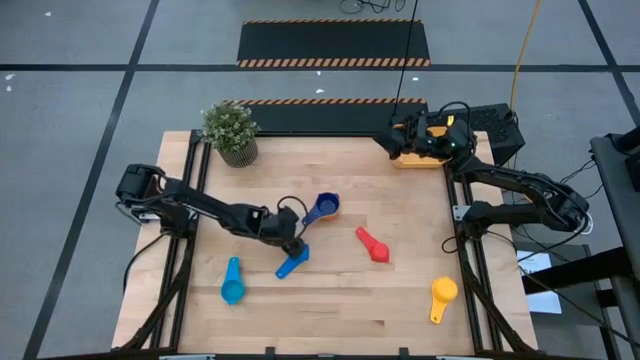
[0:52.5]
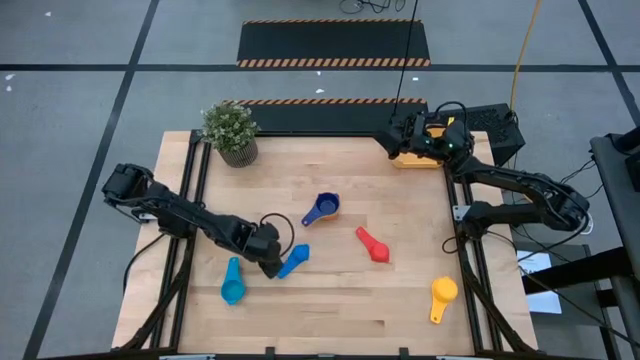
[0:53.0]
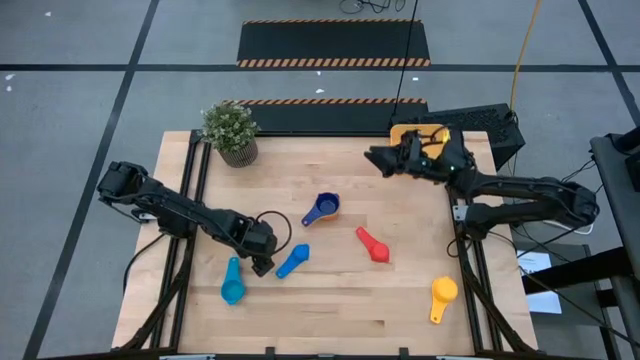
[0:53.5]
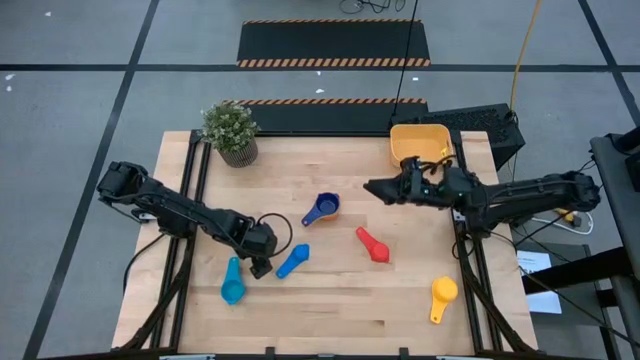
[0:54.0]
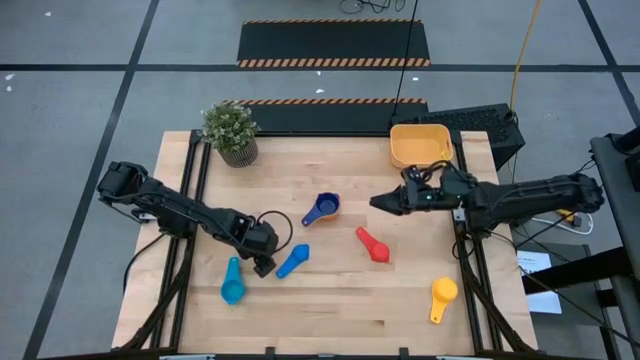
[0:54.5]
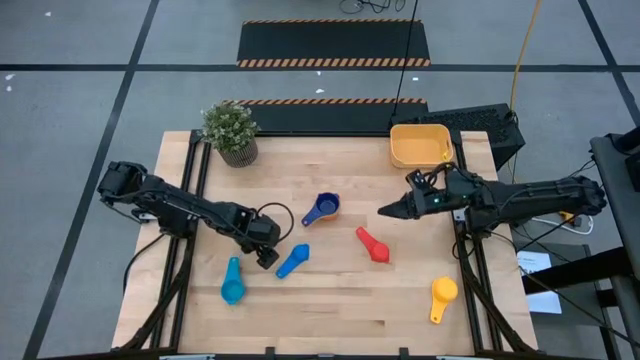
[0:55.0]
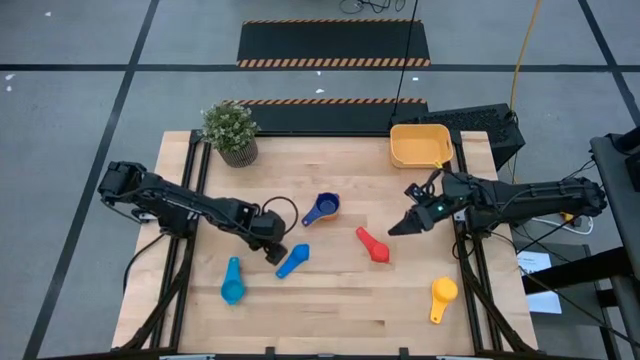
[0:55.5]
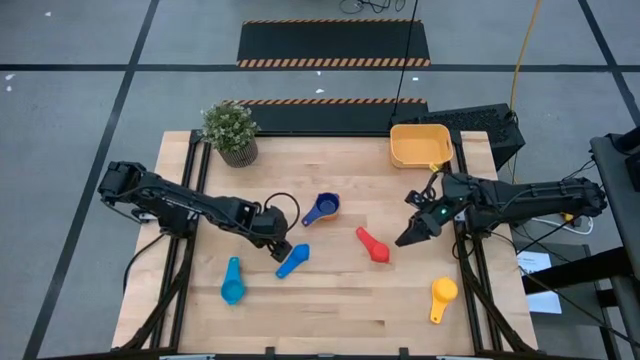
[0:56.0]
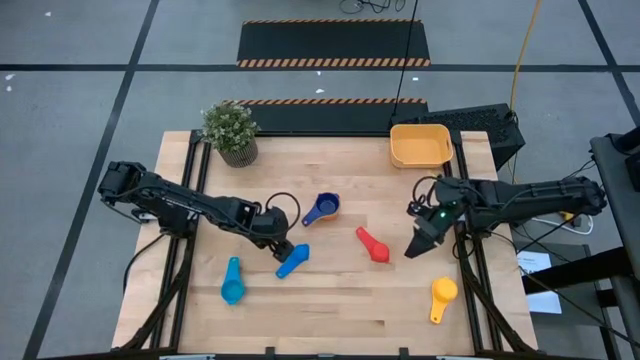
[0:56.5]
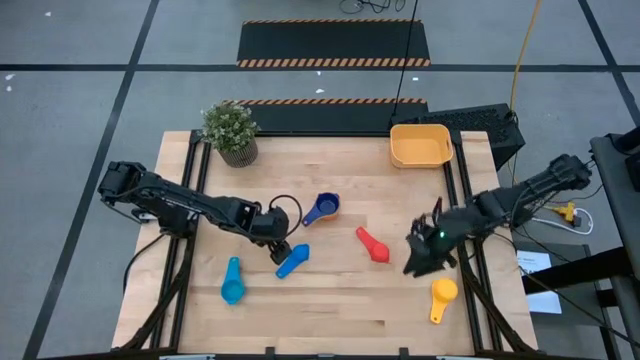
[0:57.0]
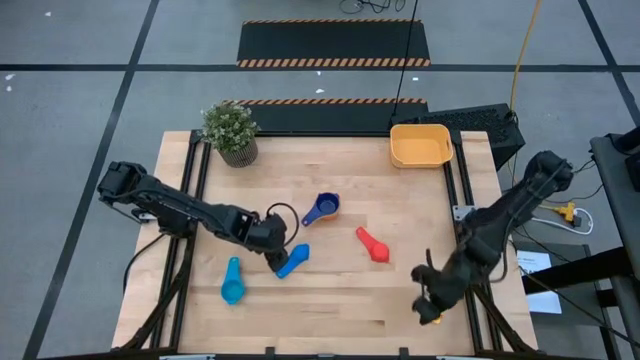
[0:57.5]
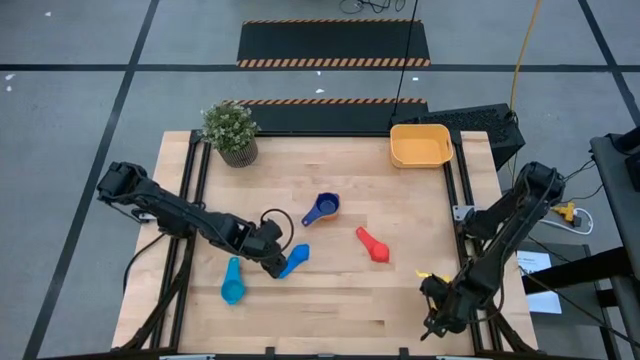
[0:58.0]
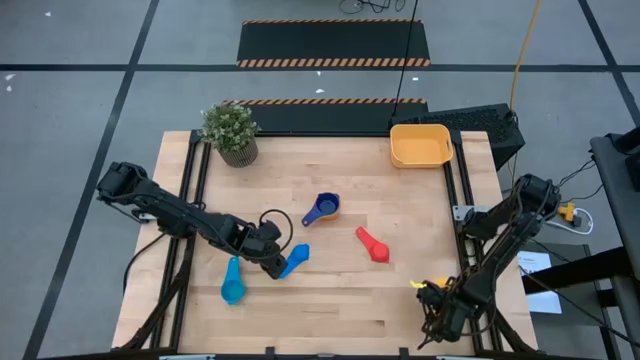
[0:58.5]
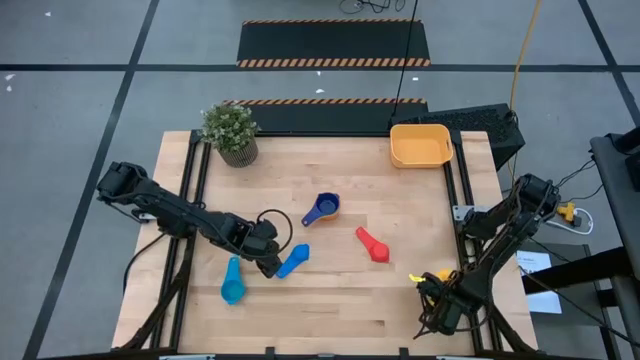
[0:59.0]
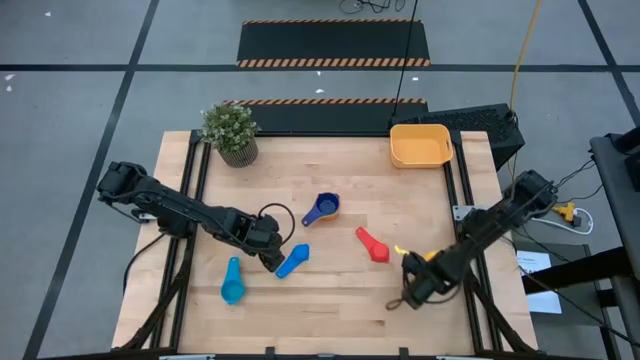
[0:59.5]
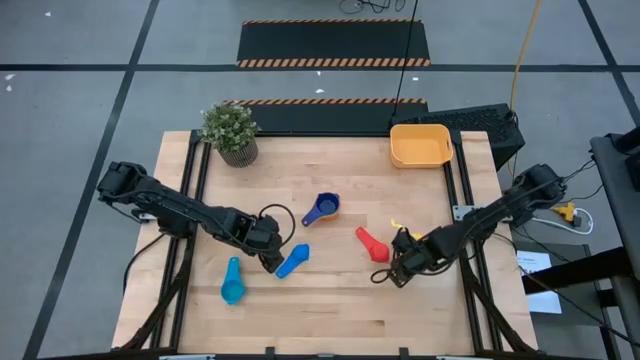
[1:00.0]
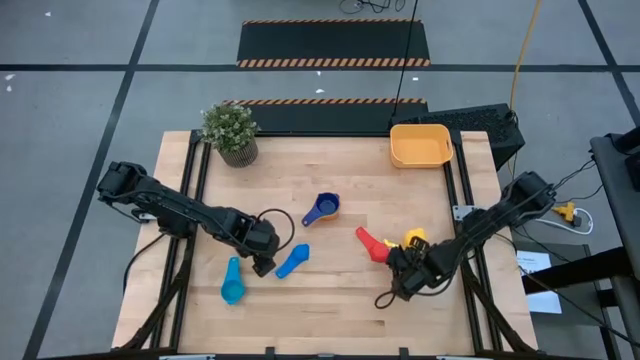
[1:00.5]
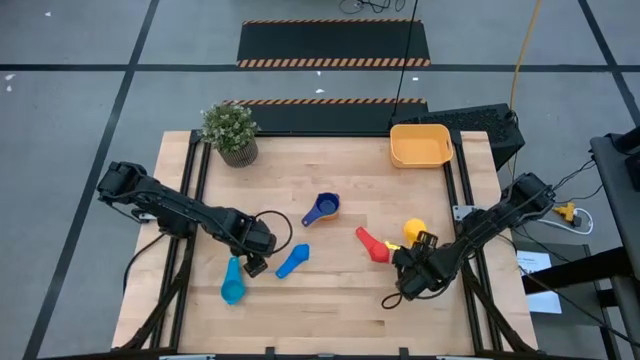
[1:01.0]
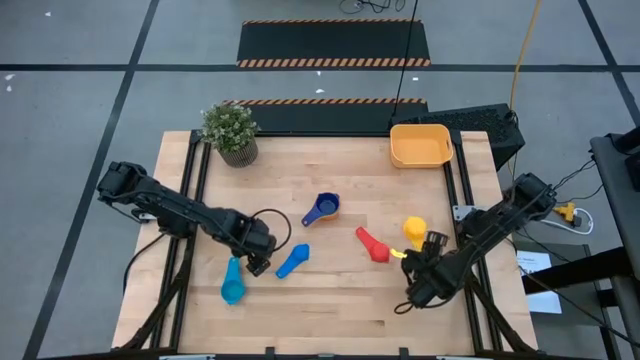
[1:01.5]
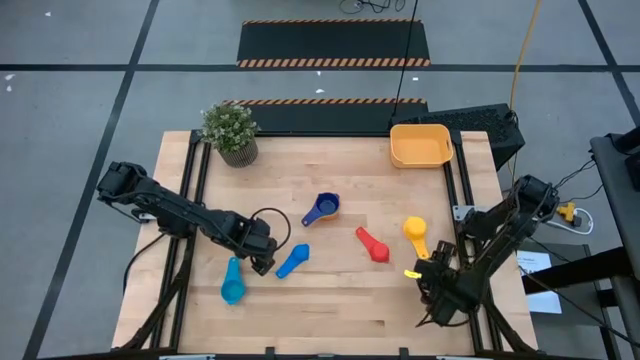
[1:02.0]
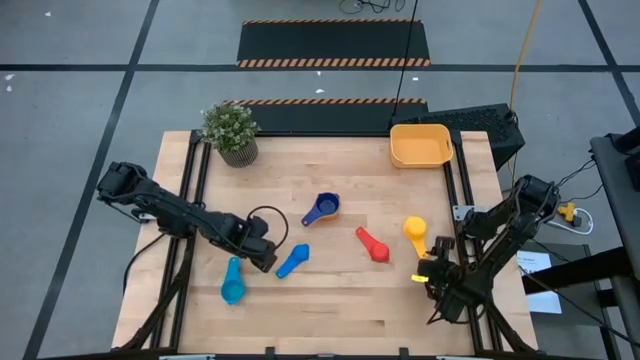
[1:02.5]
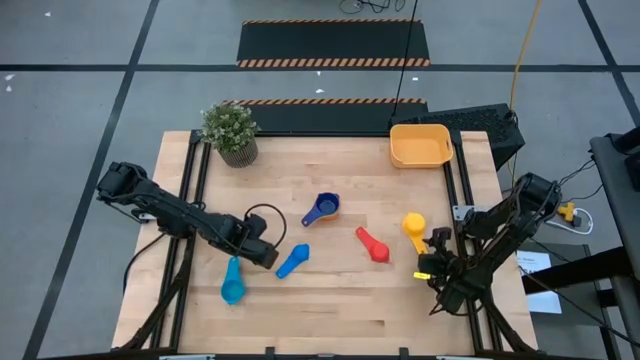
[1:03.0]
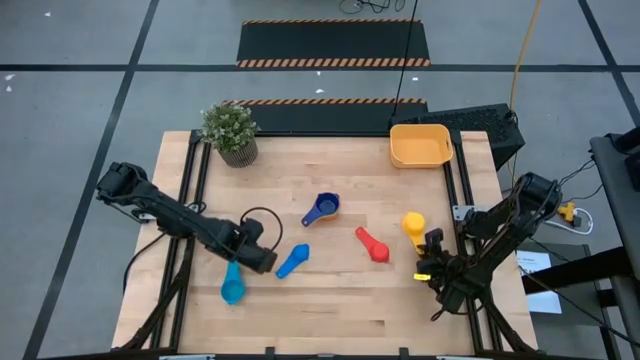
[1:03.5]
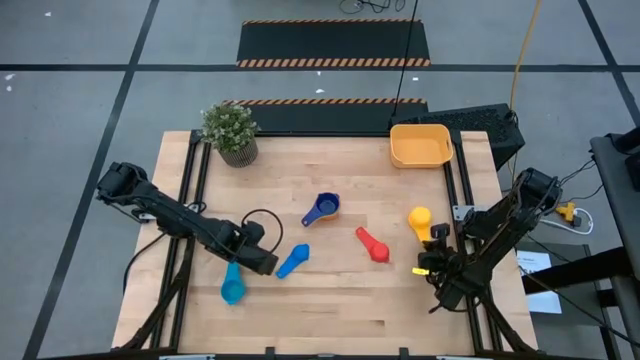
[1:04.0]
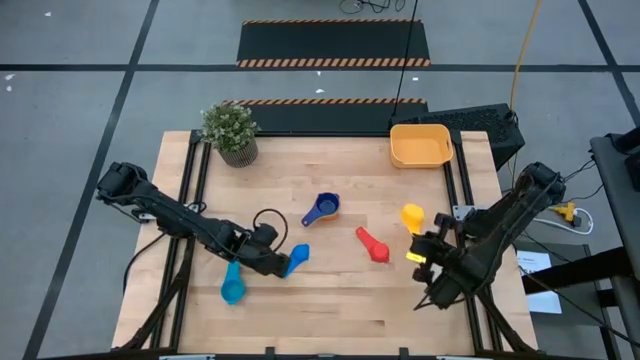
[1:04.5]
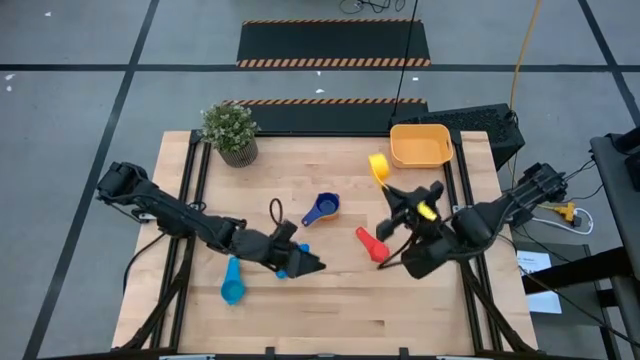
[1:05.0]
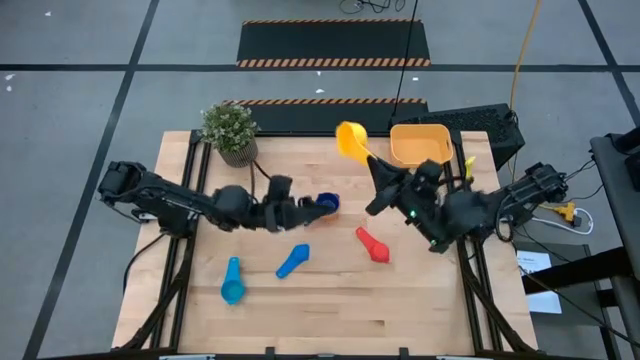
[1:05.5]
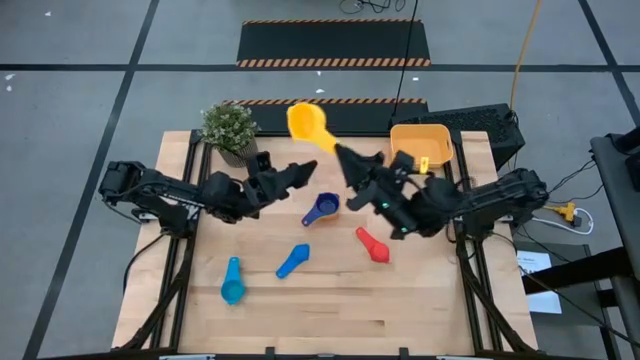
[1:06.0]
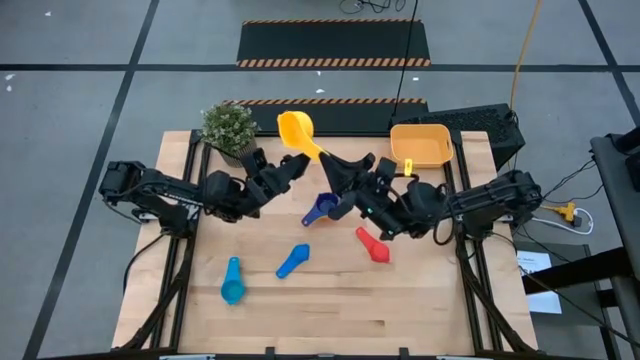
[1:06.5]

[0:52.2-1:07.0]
Task: Nest measuring cups in basket
Stack the yellow measuring cup on top of the dark blue measuring cup

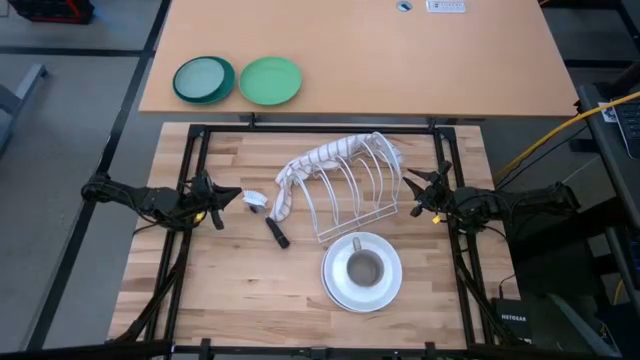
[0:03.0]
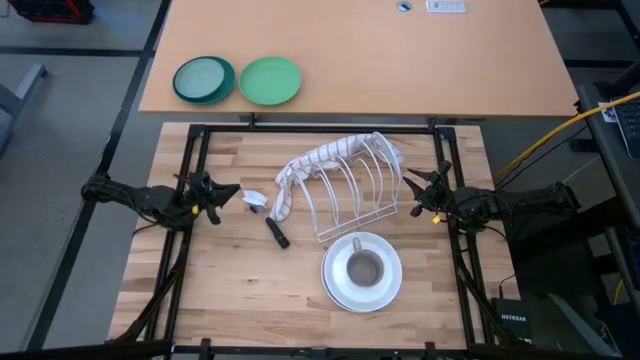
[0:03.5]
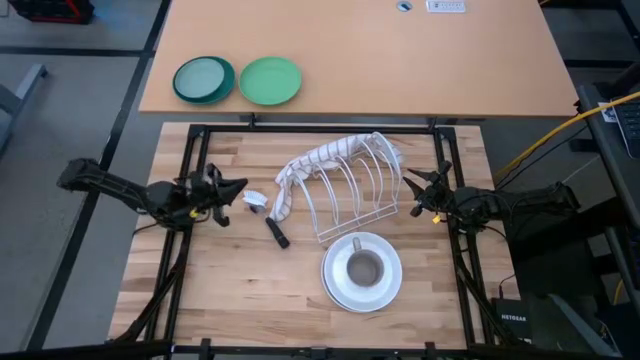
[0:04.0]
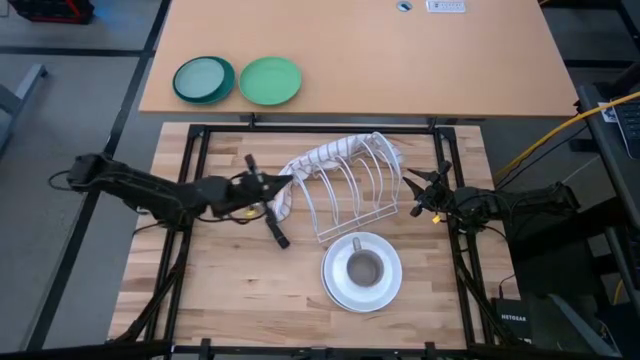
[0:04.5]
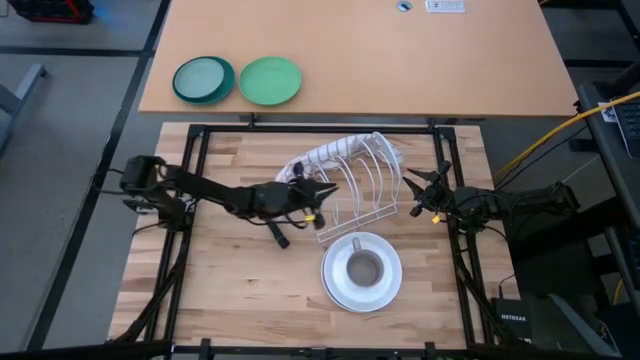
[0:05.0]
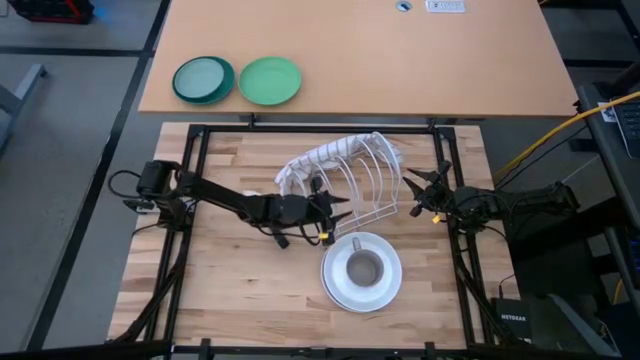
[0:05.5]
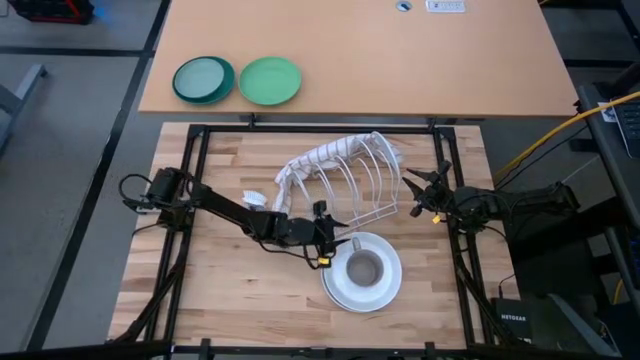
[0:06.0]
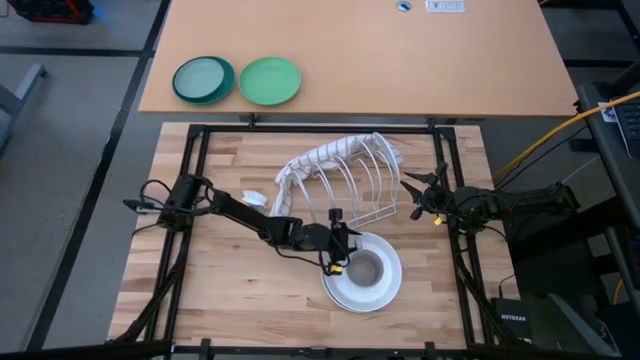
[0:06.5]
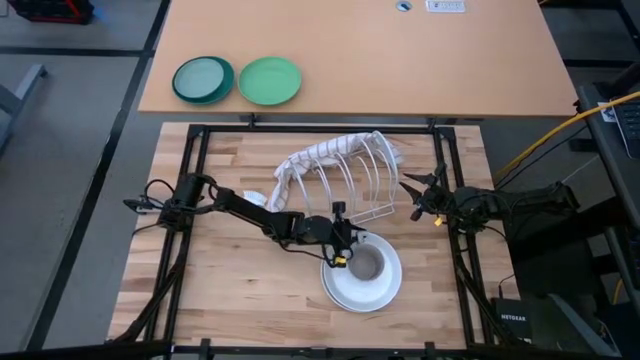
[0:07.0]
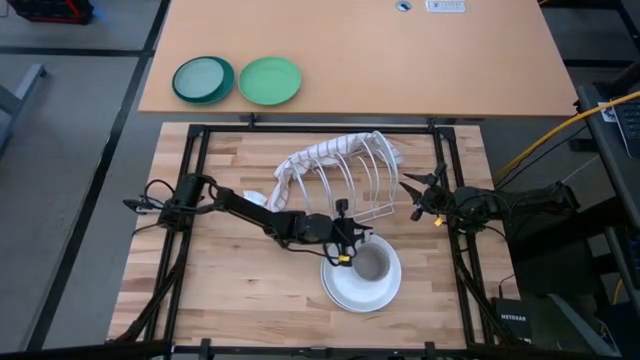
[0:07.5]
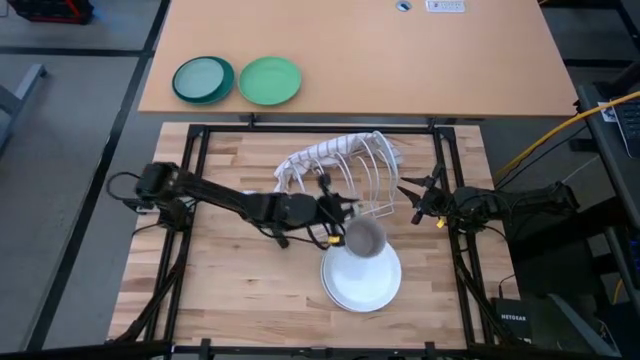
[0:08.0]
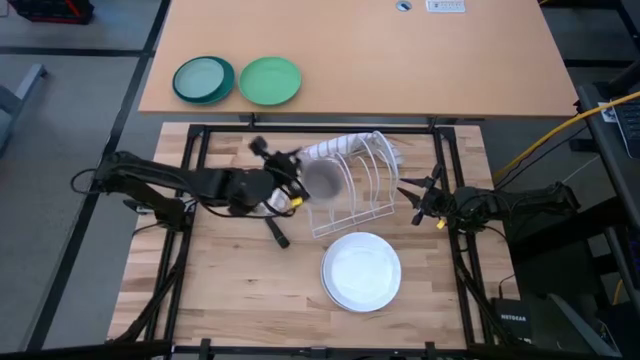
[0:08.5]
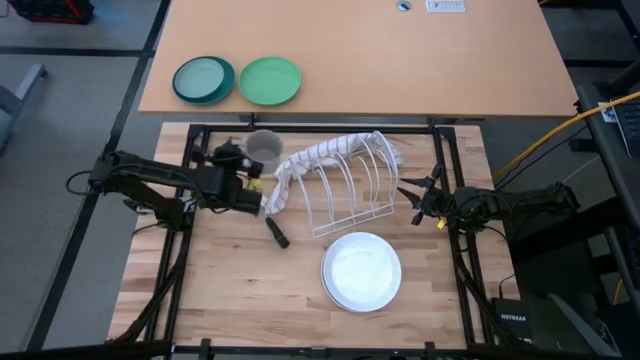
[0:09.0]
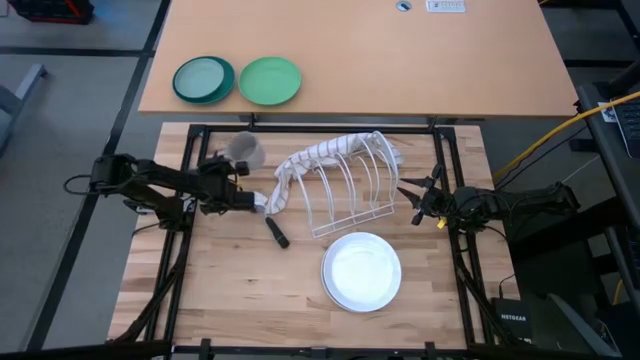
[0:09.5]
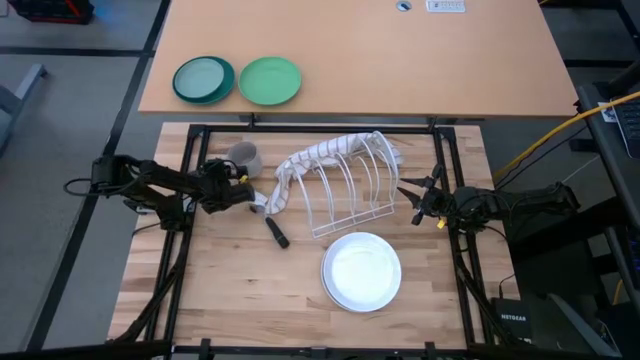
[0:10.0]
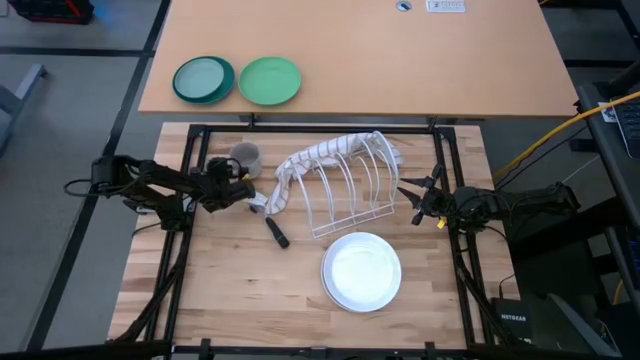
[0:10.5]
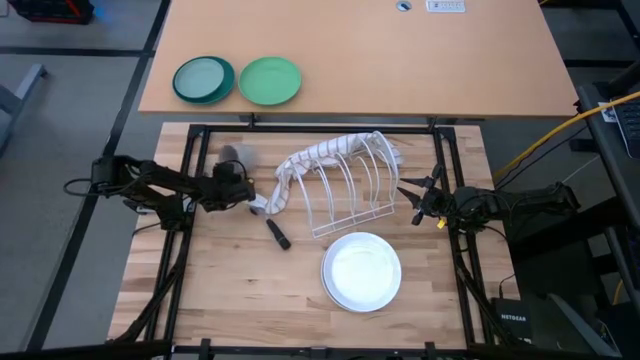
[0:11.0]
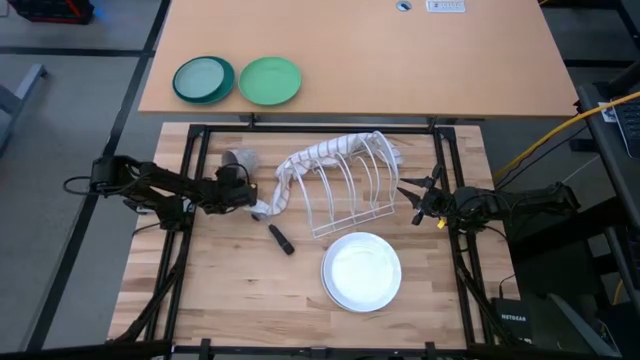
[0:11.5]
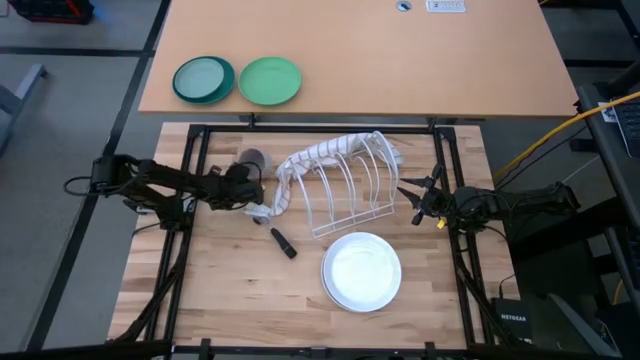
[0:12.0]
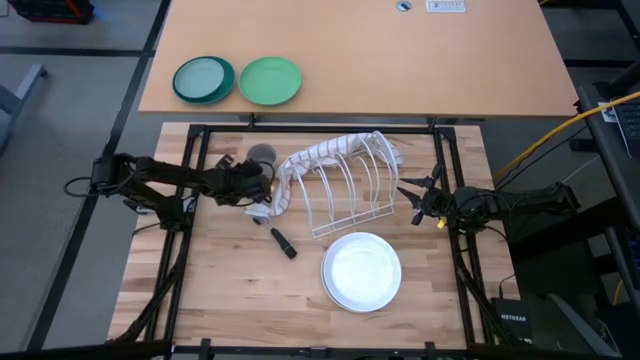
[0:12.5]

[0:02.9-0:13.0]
Task: Sort dishes
Remove the gray mug from the white plate and place it on the top left of the table
